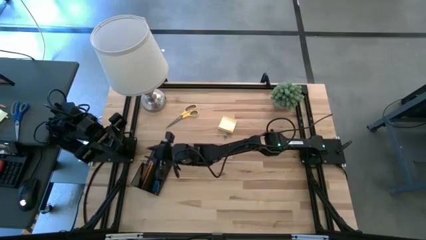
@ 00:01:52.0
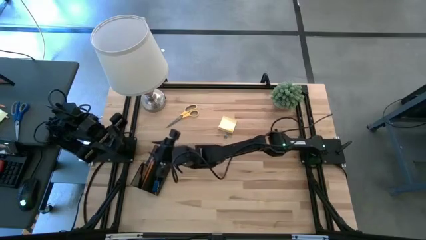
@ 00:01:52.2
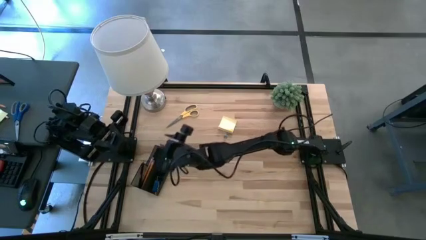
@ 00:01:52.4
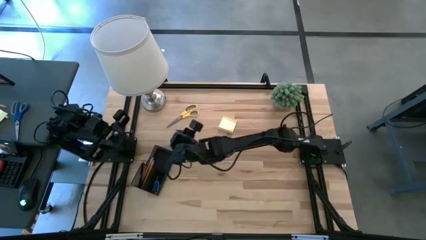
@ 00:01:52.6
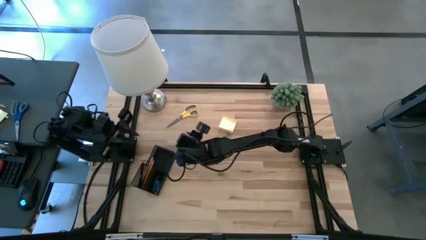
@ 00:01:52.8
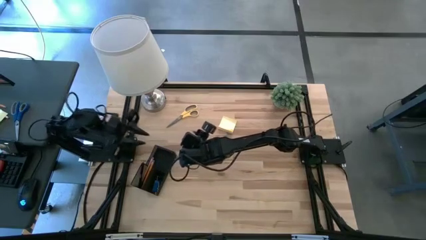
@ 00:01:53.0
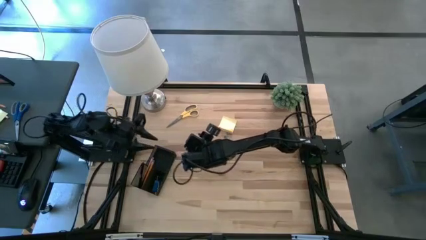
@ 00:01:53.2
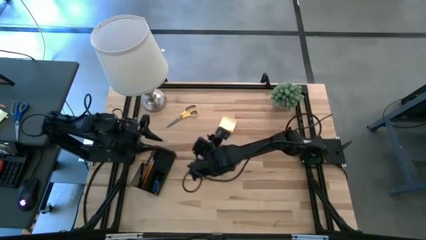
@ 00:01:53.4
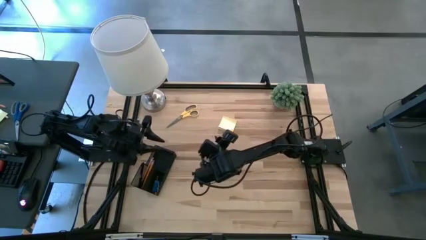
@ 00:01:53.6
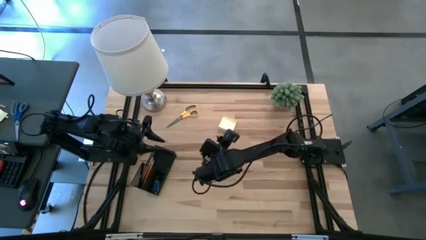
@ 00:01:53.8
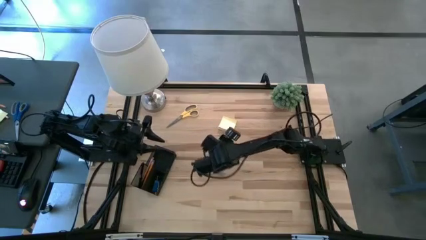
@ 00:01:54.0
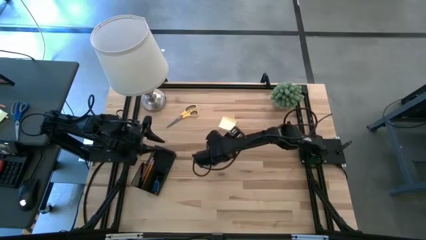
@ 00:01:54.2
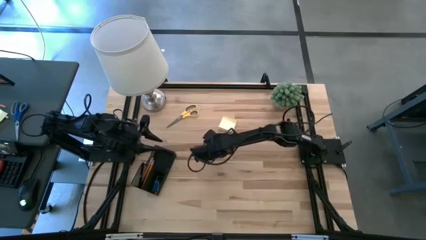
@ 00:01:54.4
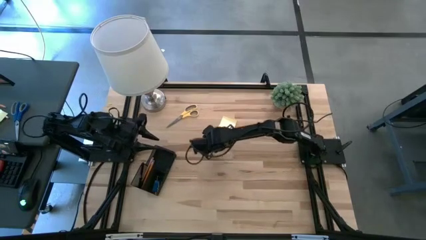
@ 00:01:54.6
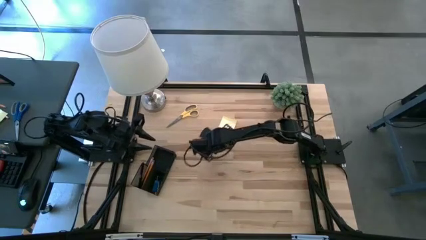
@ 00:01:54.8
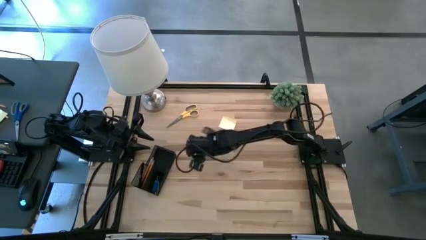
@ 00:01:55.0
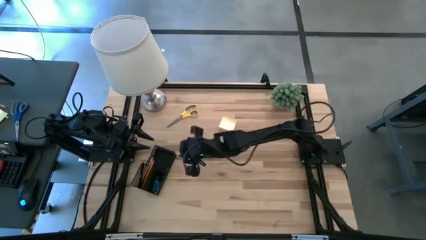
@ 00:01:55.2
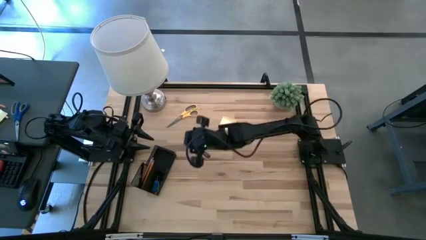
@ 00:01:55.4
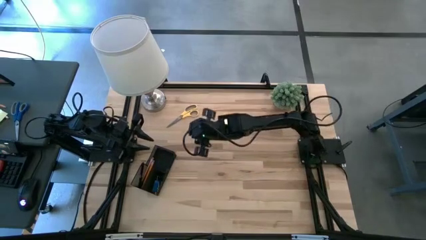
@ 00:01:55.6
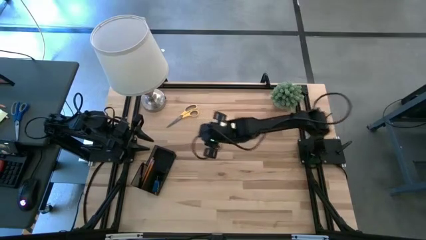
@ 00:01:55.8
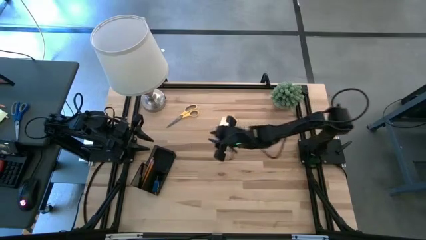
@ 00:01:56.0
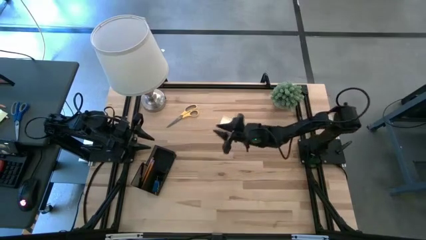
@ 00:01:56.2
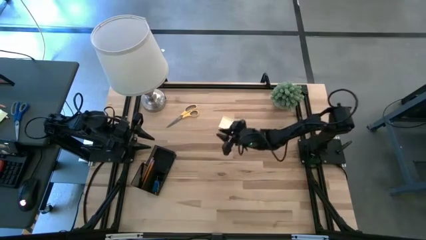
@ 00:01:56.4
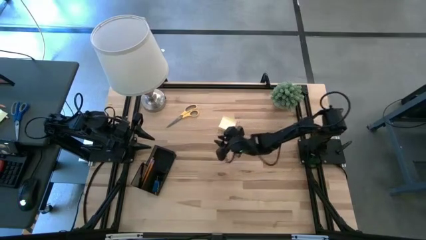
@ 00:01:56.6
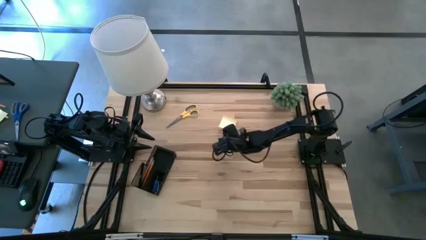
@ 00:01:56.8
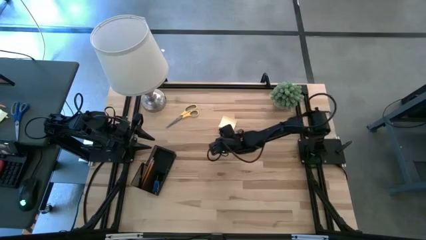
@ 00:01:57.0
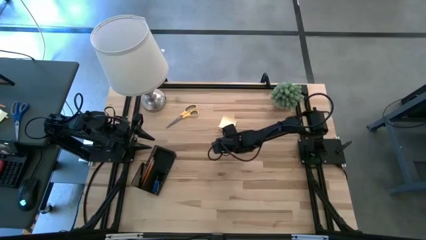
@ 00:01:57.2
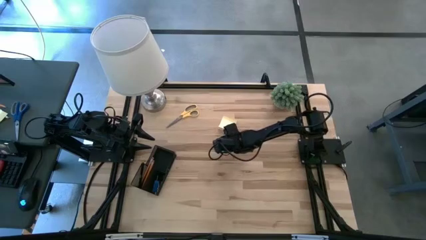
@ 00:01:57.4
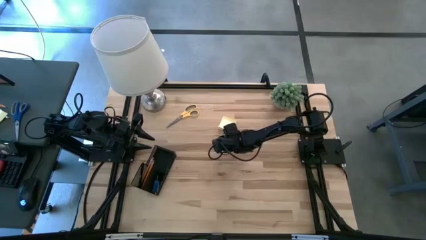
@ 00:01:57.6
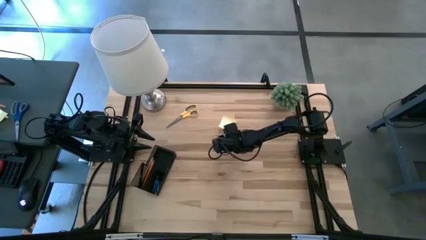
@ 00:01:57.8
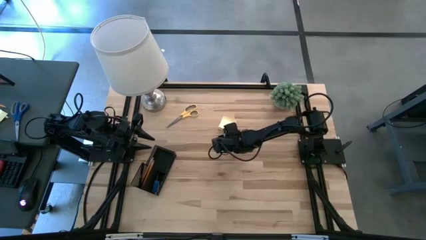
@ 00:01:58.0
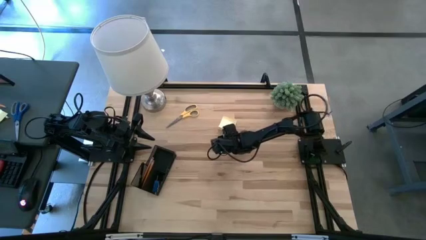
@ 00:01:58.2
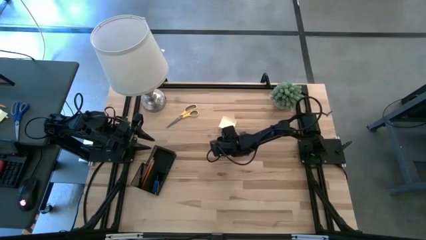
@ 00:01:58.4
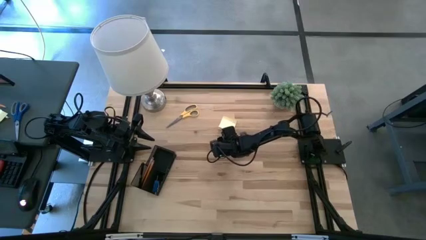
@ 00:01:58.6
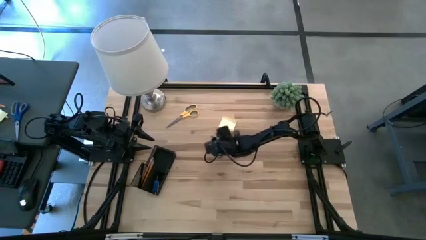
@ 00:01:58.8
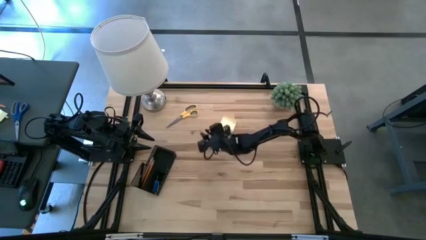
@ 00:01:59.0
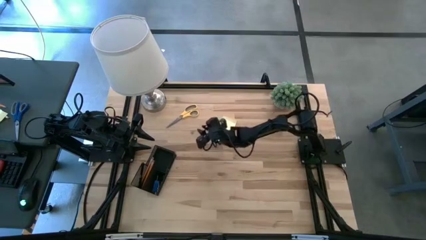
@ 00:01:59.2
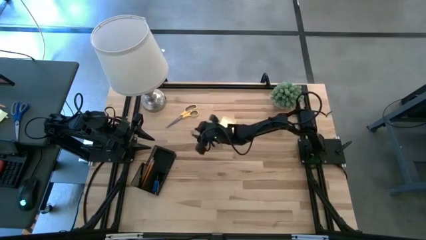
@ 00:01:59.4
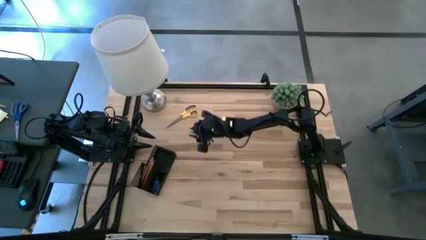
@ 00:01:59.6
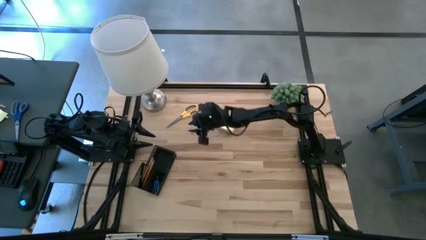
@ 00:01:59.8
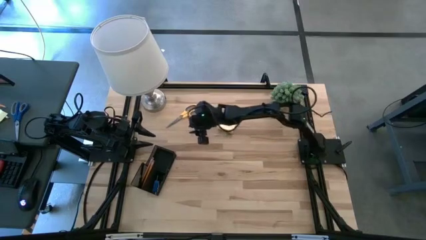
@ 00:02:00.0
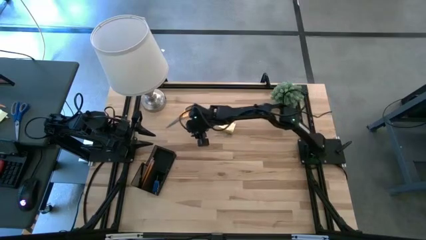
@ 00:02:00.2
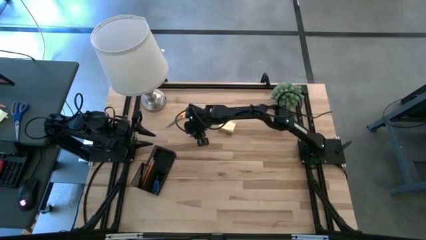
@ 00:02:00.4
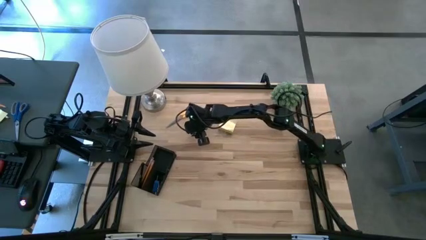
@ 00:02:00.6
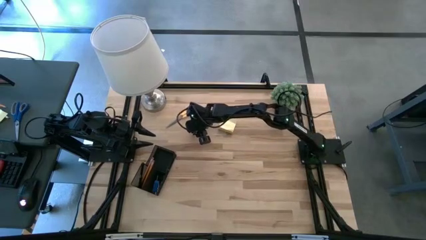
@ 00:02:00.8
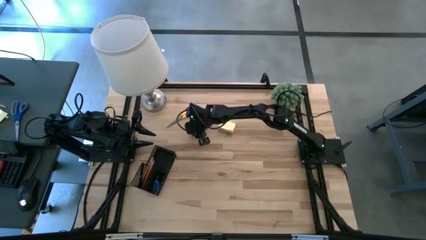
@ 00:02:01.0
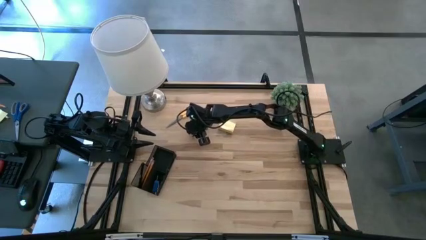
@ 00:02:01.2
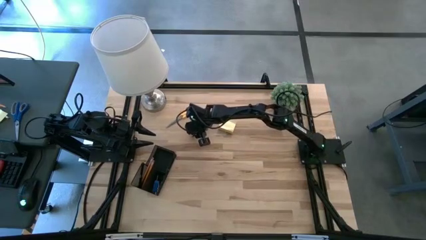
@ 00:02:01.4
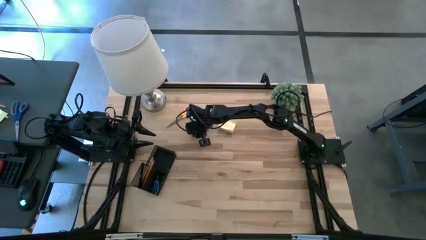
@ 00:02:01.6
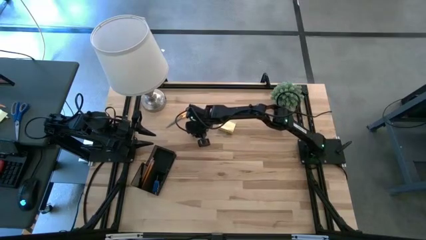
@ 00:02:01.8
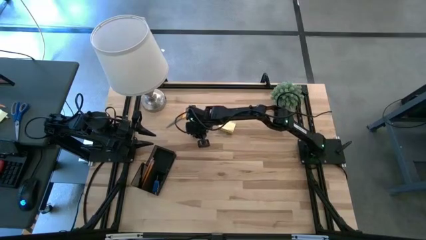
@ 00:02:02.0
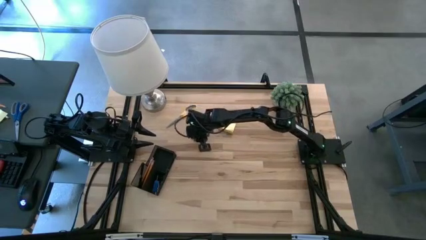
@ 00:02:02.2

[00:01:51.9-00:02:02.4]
Task: Pick and place office supplies into organizer
Put the blue binder clip into the black desk organizer

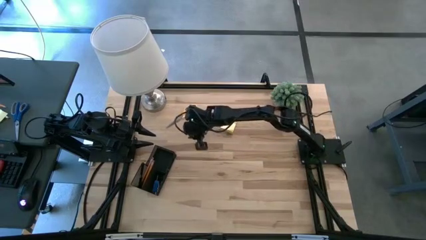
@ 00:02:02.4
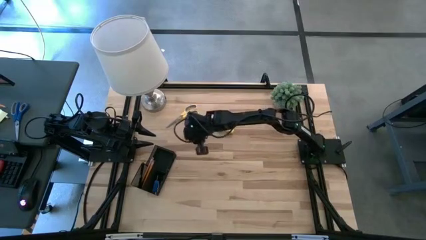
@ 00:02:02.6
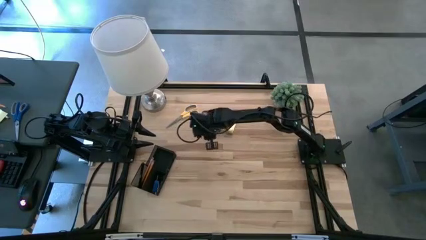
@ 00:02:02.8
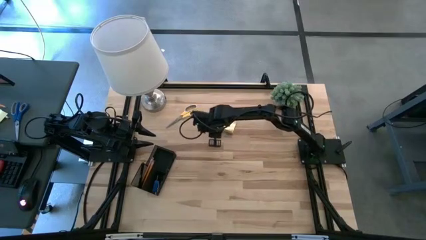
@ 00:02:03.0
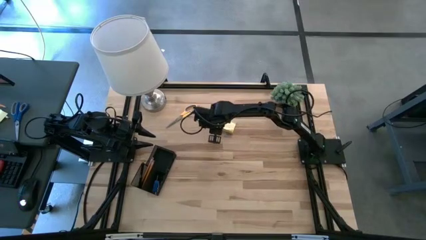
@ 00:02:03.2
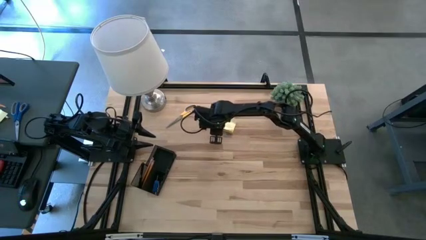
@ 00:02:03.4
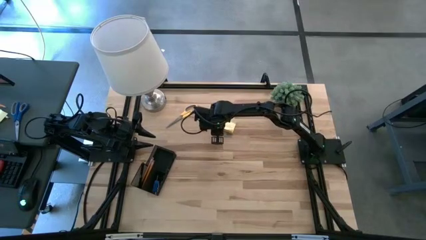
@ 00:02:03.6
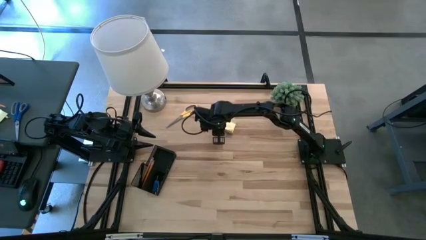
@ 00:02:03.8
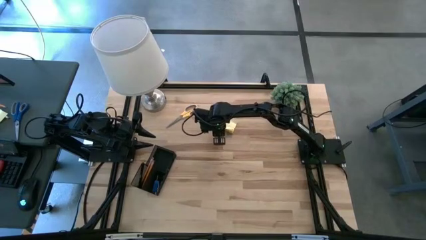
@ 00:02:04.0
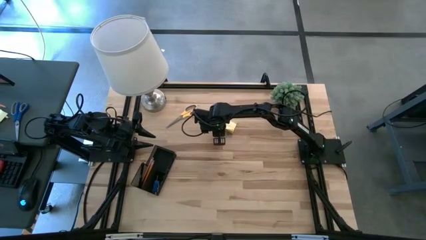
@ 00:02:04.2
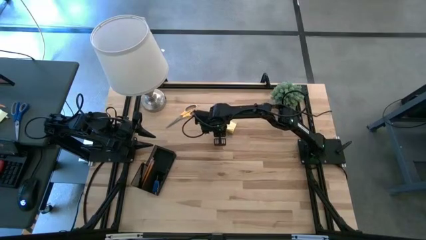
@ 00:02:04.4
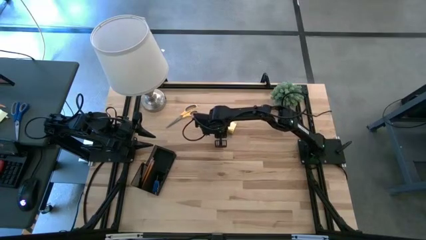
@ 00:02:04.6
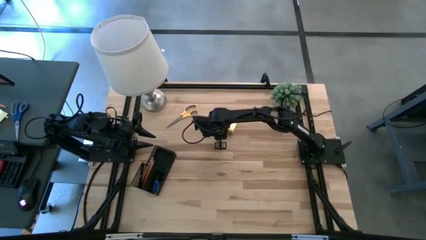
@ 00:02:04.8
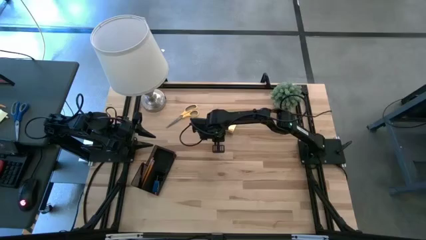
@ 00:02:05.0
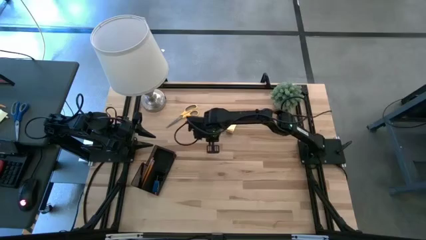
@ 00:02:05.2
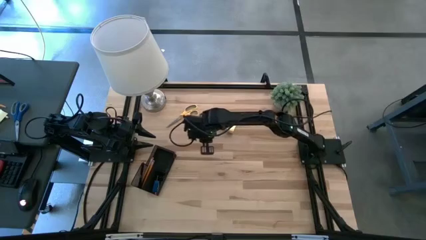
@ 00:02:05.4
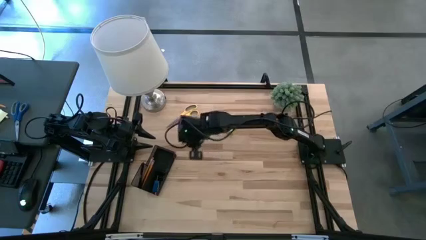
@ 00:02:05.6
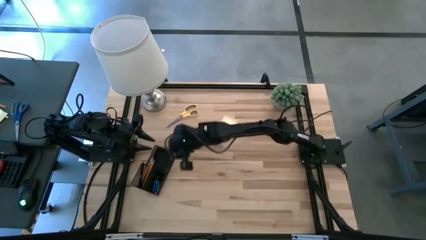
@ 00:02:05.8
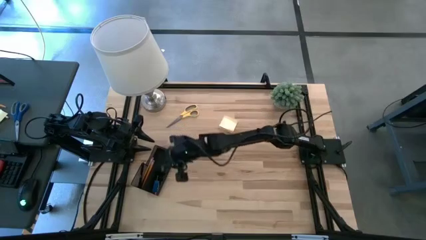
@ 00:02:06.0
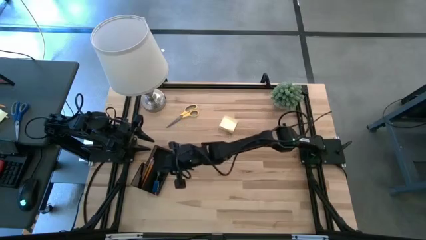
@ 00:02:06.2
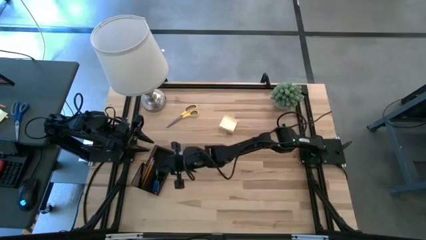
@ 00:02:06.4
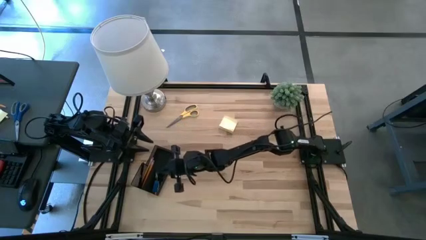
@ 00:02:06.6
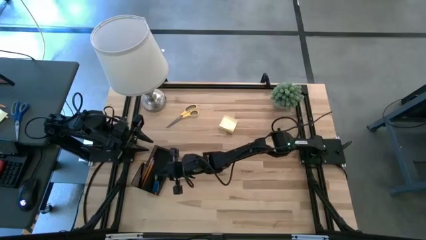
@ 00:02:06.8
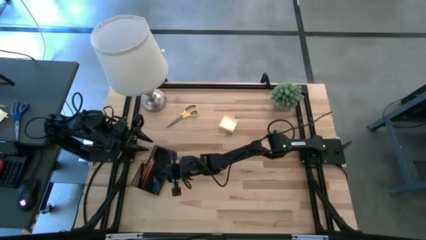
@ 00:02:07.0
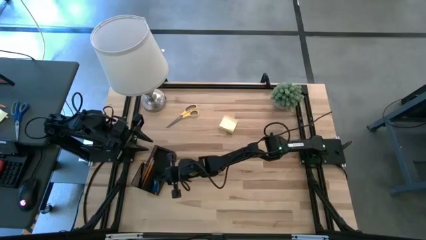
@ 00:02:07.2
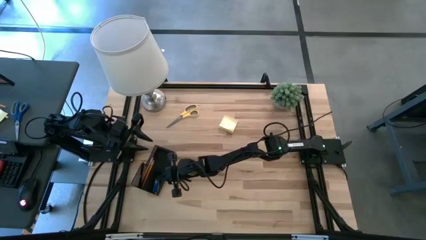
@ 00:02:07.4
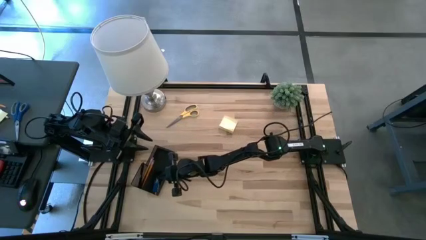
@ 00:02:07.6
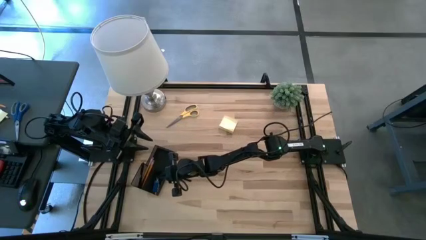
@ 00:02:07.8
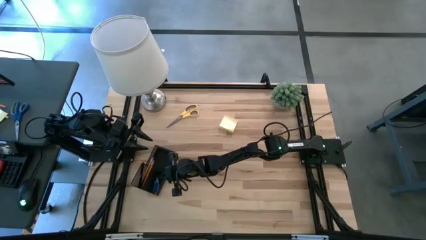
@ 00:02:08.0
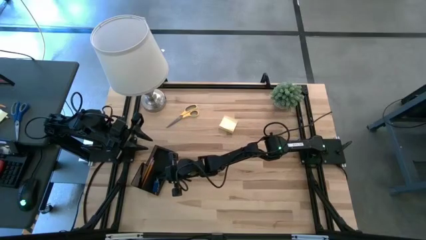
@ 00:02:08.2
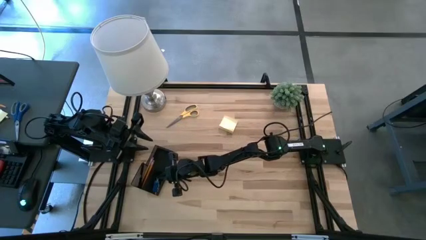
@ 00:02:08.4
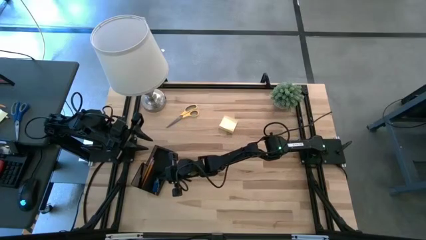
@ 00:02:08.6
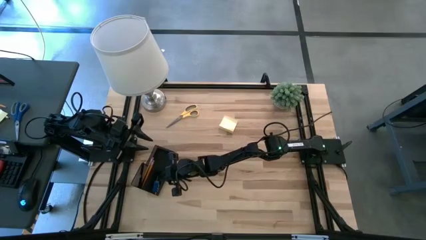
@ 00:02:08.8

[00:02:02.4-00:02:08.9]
Put the blue binder clip into the black desk organizer
